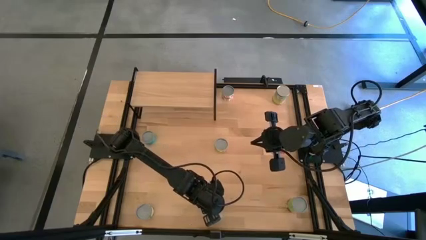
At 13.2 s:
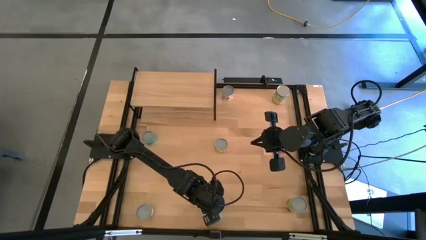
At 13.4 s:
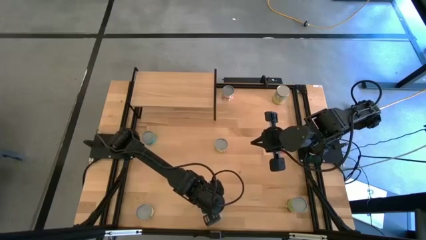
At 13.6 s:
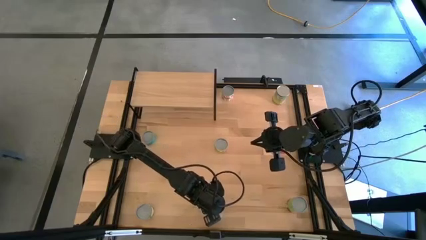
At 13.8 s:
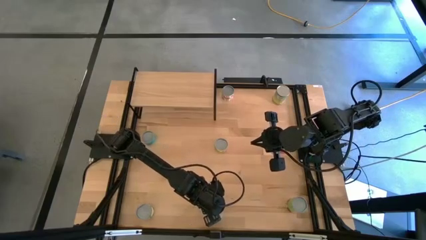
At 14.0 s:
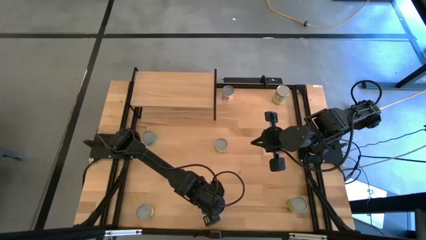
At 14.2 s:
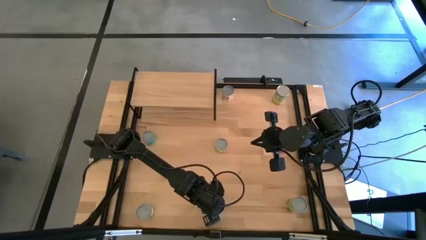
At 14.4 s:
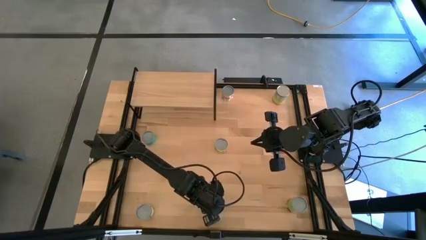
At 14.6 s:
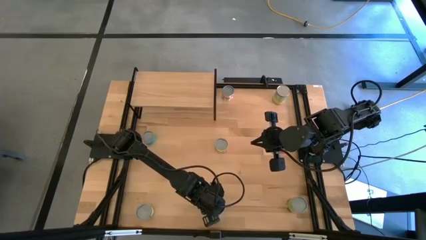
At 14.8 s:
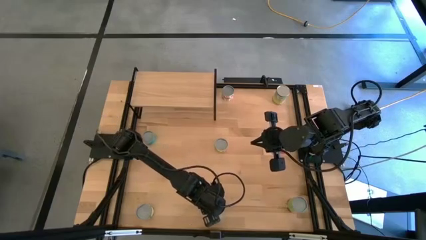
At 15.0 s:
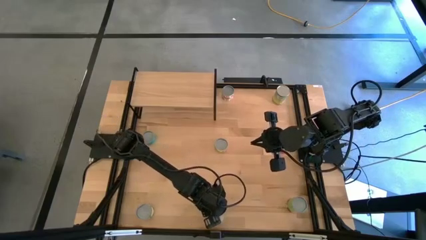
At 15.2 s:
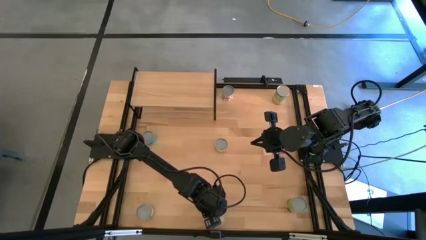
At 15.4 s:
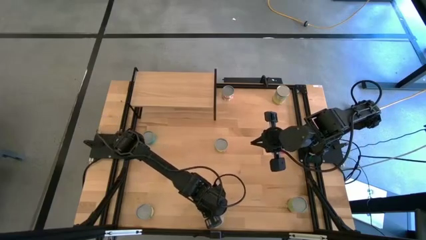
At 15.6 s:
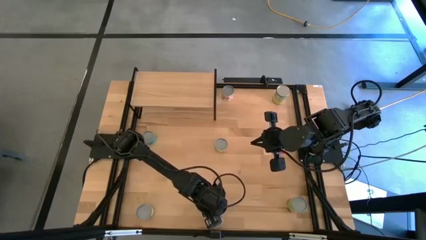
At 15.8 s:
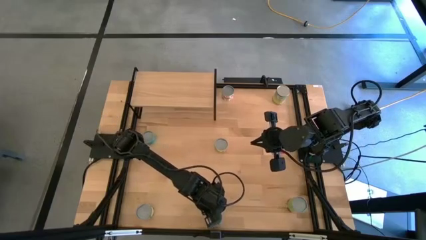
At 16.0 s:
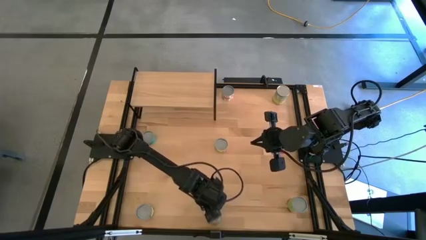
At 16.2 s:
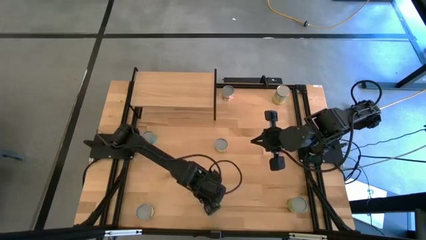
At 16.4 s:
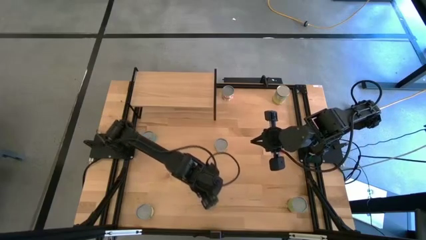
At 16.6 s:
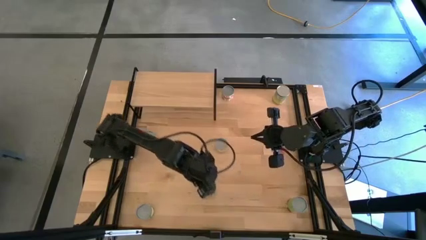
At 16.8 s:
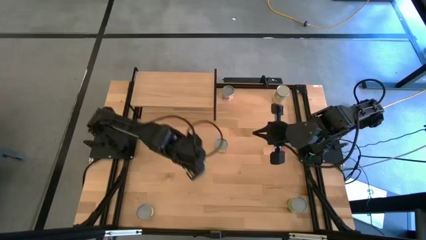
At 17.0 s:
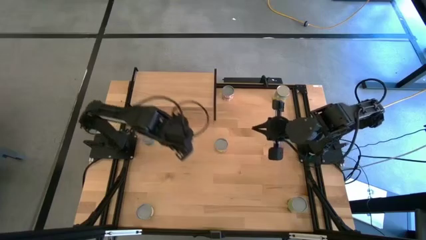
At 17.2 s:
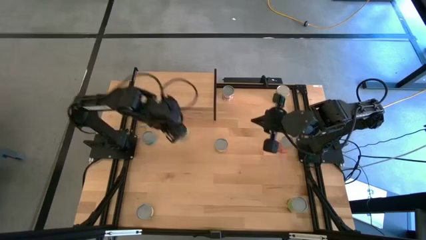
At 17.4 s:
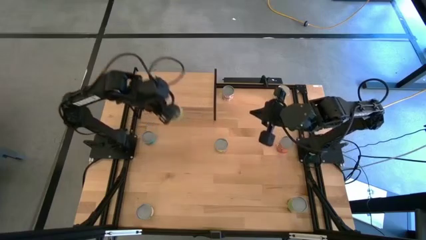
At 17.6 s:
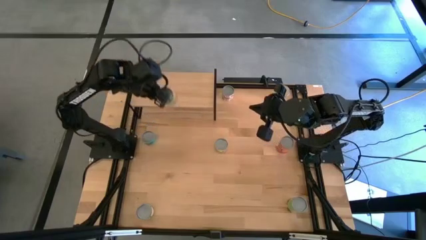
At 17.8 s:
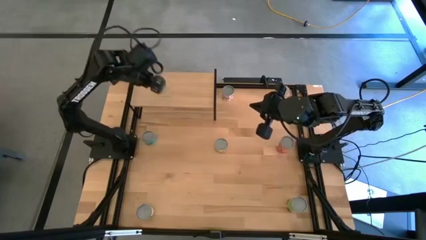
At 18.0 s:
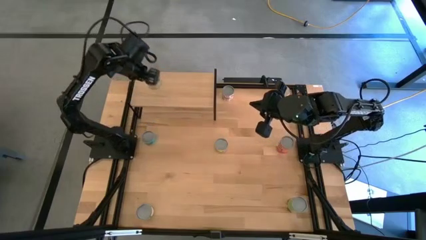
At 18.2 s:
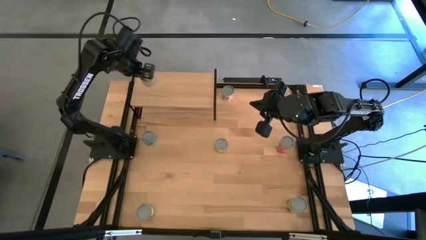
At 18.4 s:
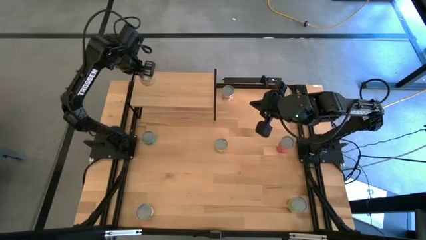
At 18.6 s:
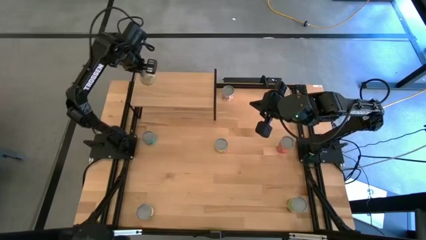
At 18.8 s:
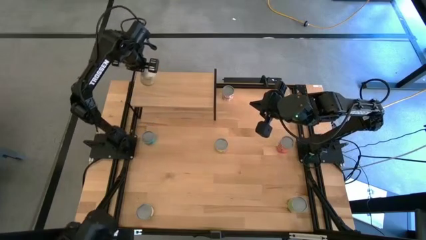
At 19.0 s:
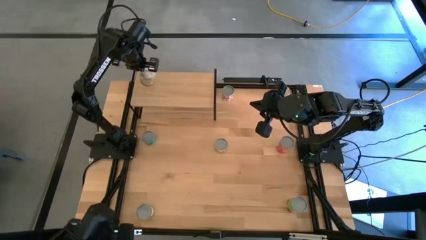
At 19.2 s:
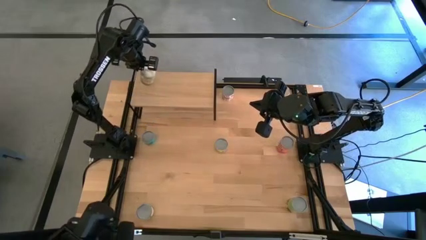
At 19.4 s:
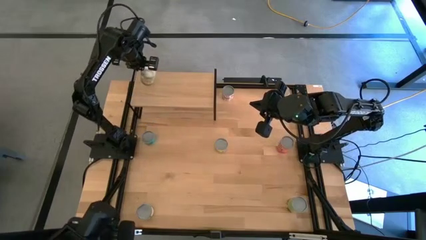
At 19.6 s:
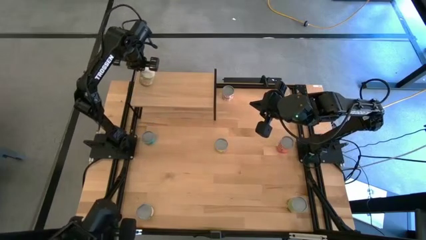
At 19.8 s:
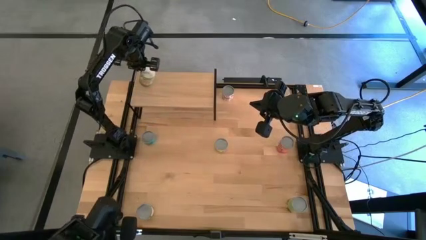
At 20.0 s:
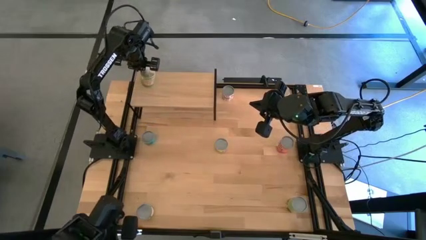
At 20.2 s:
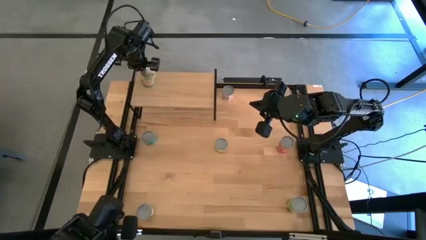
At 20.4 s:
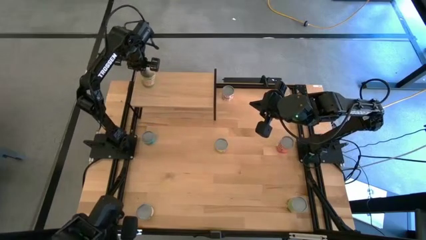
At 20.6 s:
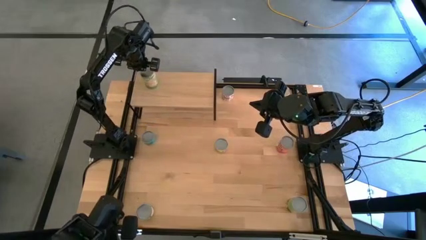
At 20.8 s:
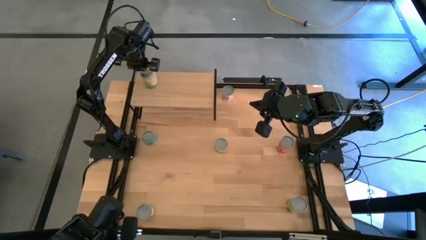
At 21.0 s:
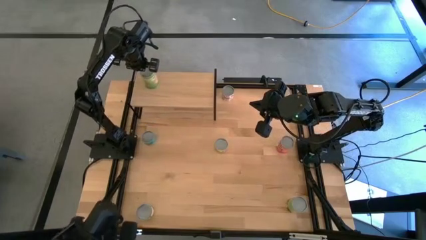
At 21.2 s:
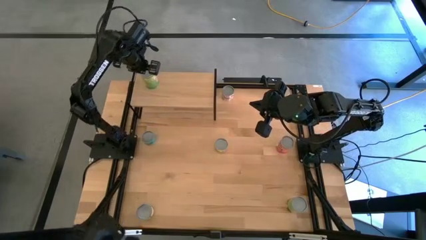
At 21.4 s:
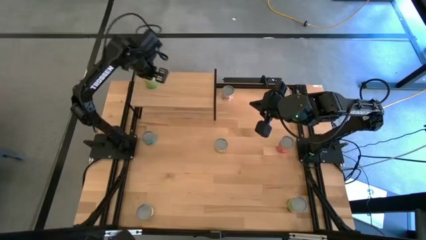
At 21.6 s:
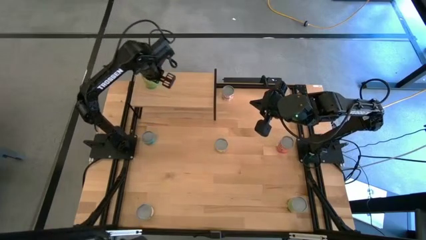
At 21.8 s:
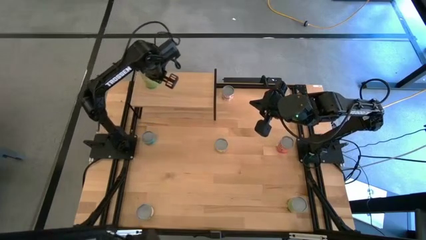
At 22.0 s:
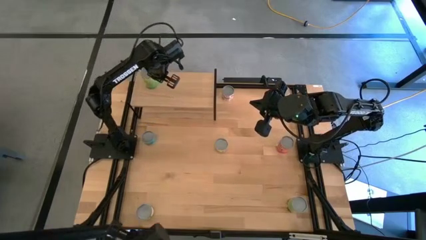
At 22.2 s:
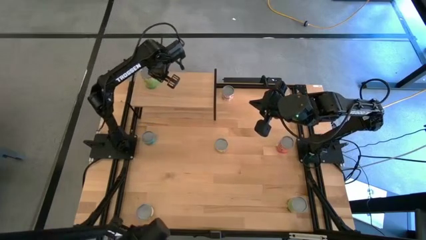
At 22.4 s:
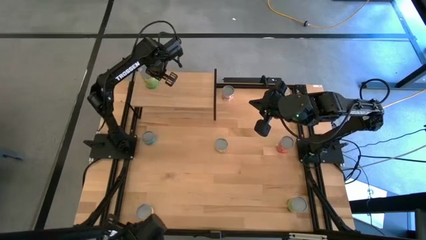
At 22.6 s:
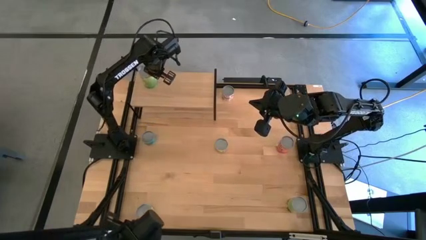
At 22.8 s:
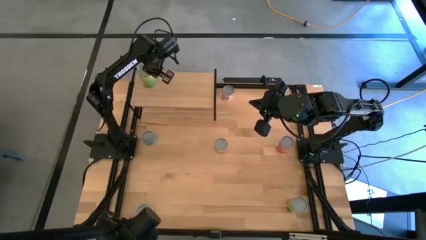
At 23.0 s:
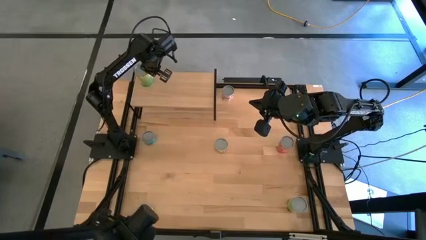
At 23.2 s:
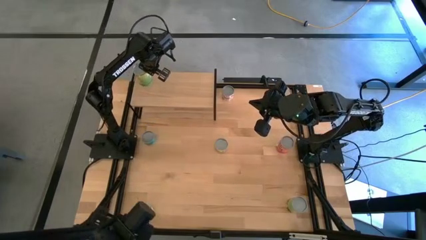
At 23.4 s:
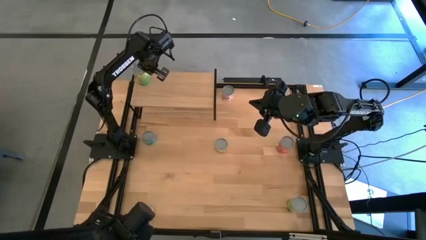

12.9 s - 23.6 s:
Task: Pick and place cans onto a shelf
Put the canned oranges on the shelf

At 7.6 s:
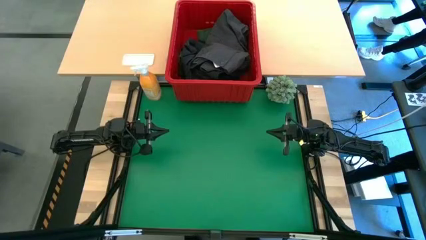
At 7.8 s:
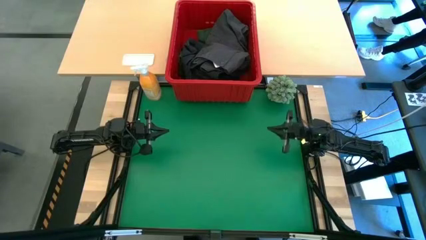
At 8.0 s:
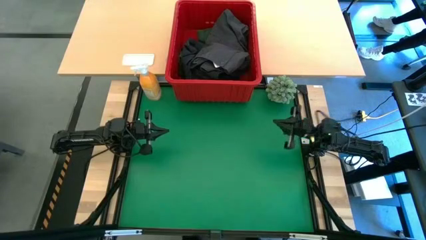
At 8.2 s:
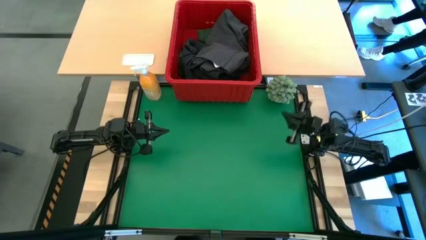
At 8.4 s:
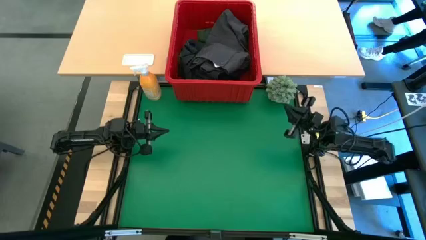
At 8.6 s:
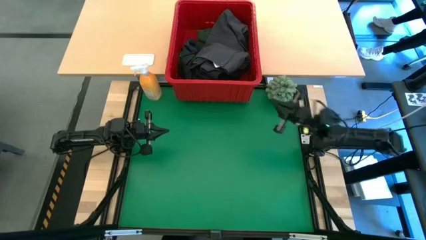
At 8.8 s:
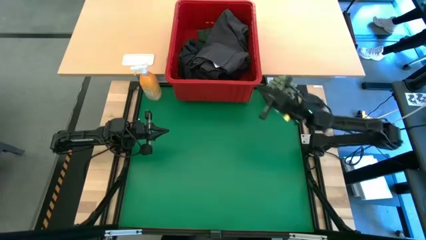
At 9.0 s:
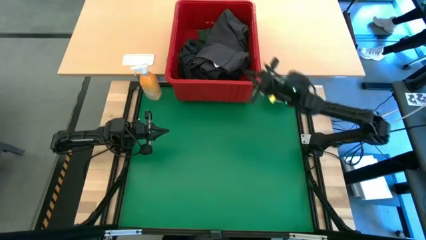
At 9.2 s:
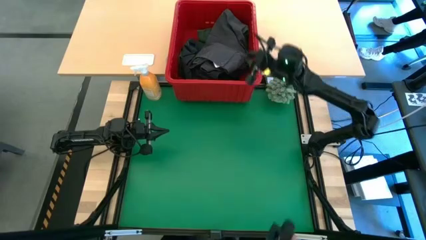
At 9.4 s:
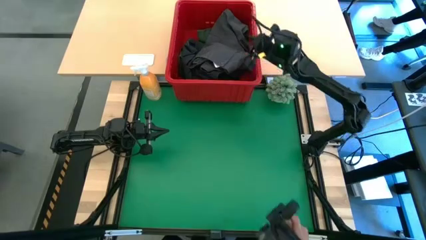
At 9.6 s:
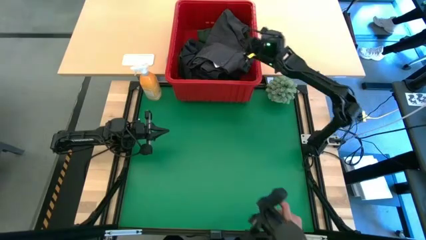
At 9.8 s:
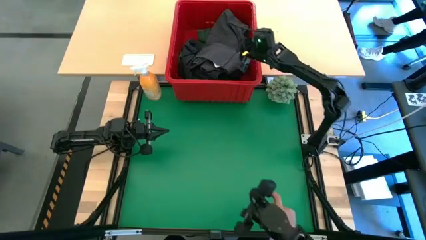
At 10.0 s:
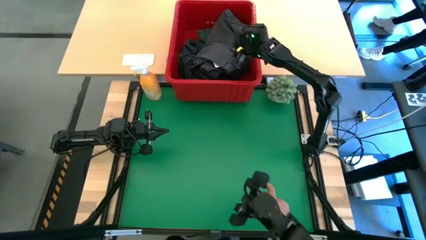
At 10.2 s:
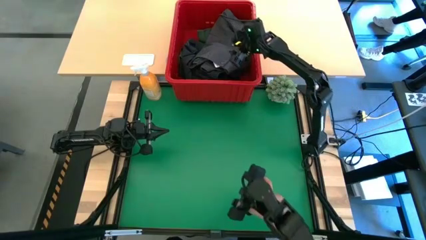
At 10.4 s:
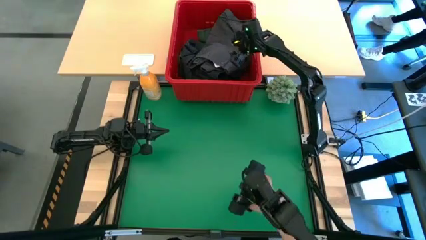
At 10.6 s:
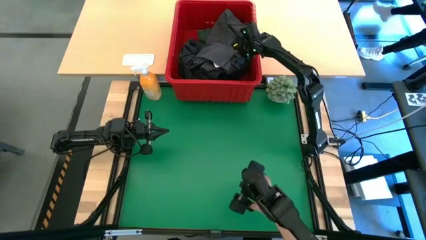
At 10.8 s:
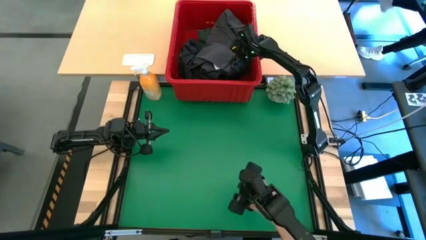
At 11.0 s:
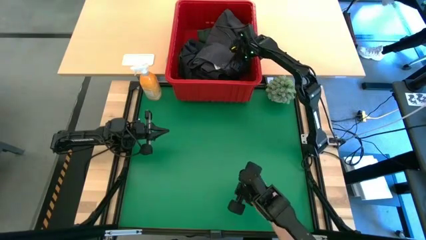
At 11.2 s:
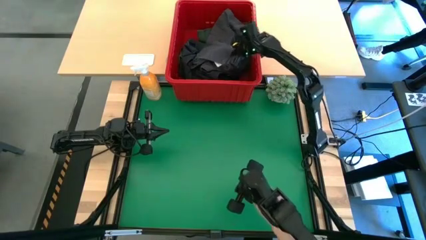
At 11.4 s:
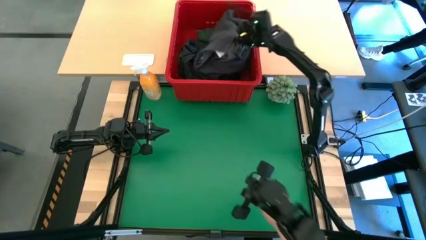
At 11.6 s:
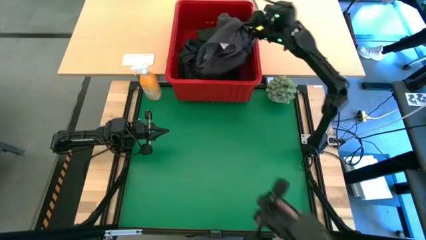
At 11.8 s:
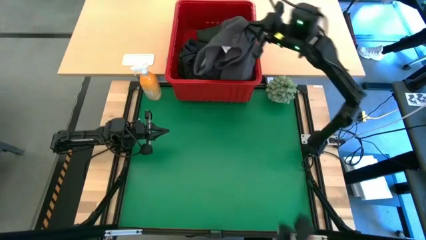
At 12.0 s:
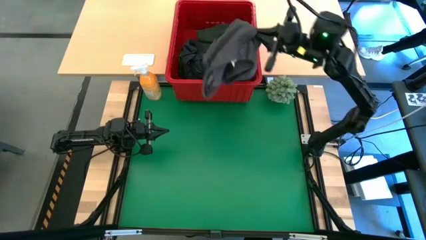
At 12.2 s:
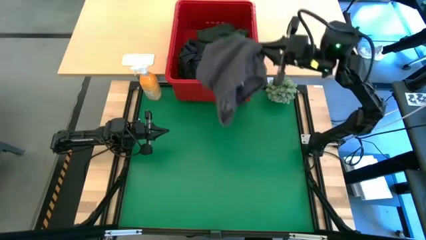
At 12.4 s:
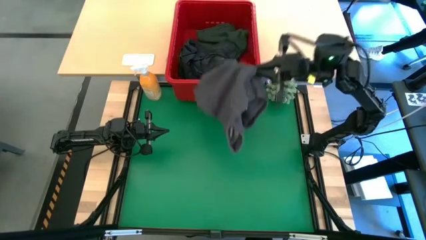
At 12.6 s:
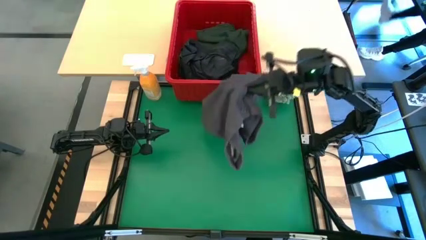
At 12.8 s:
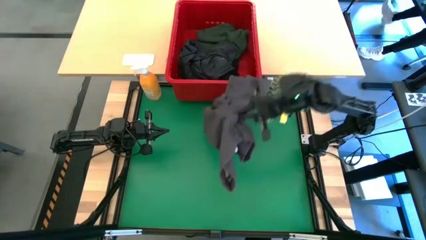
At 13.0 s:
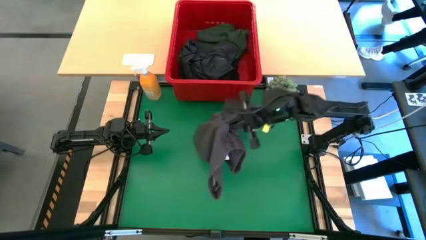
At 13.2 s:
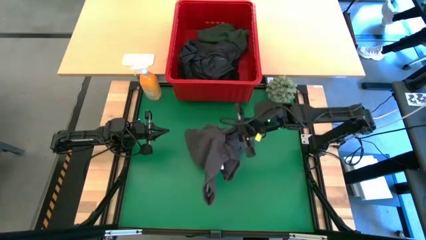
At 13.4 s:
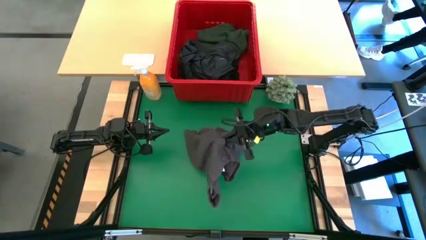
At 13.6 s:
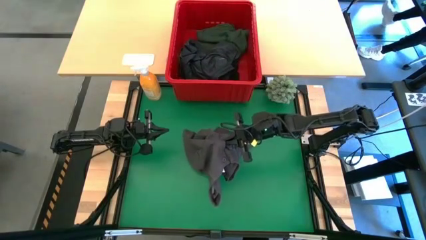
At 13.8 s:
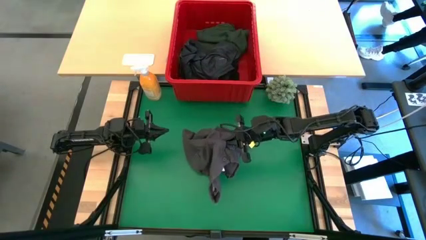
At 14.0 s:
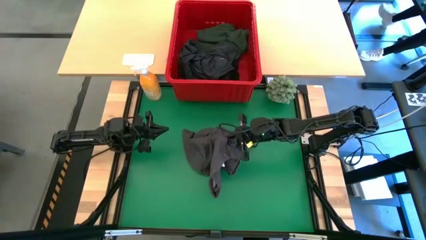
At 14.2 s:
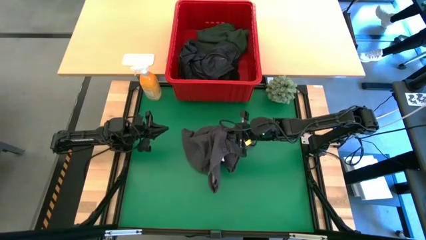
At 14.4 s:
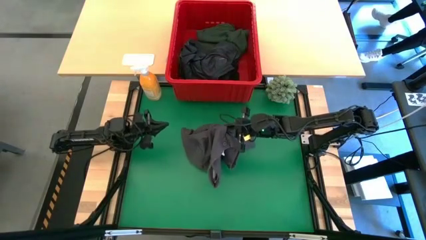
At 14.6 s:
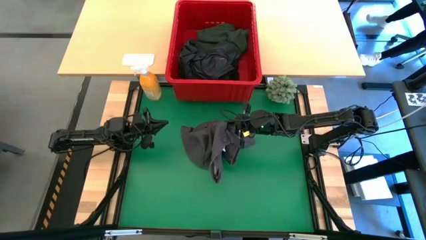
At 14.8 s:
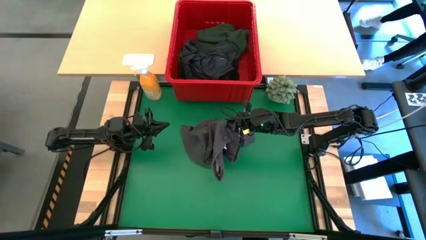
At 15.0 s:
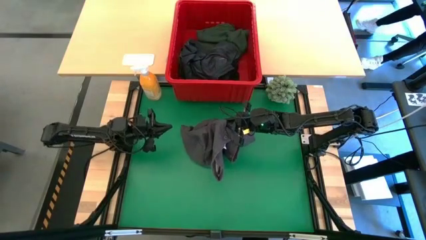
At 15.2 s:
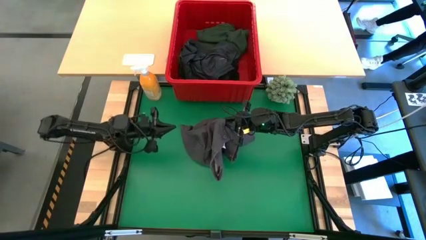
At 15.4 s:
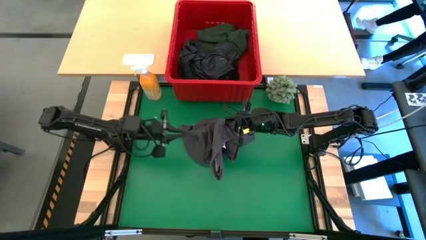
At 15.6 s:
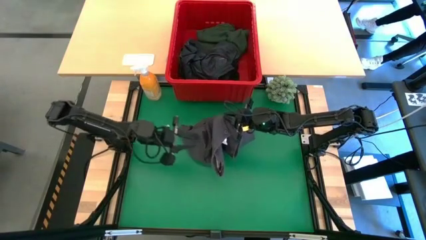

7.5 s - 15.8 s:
Task: Fold Laundry from Bin
Remove the gray short from the red bin
